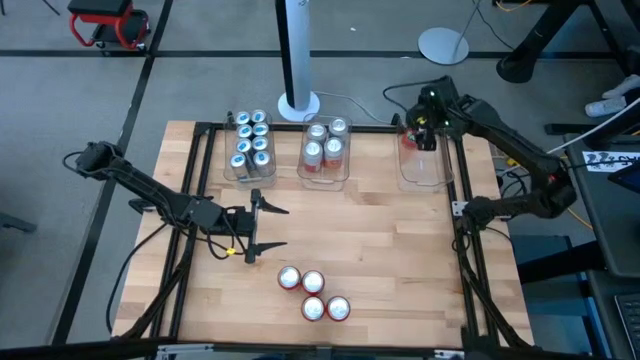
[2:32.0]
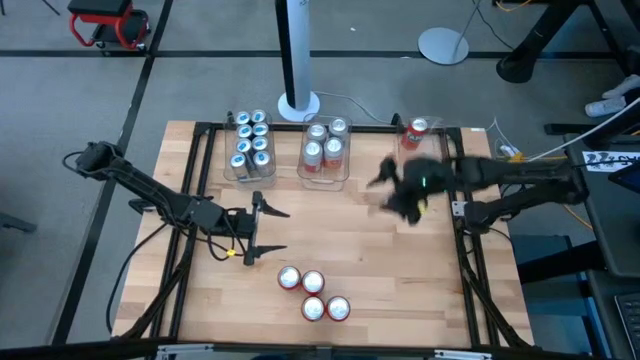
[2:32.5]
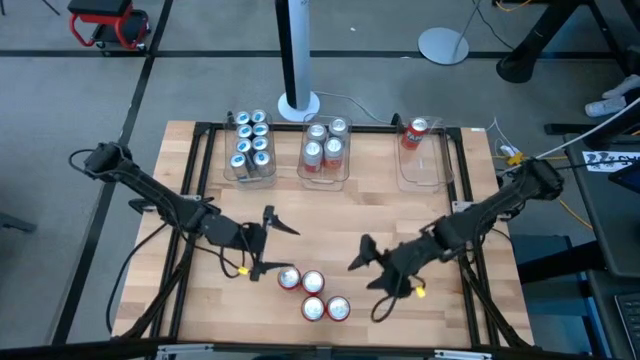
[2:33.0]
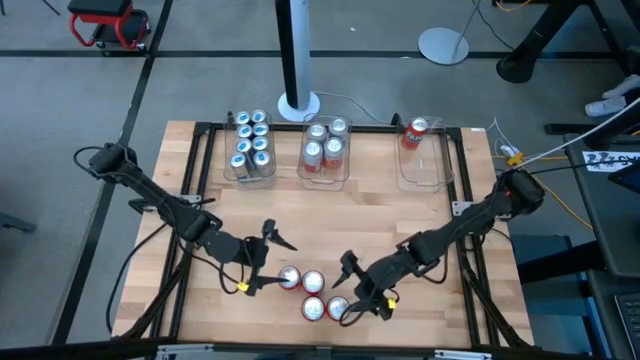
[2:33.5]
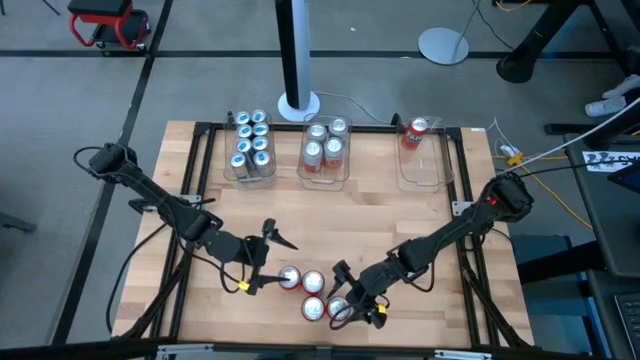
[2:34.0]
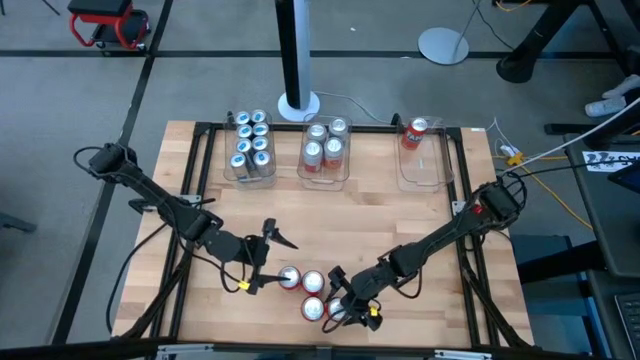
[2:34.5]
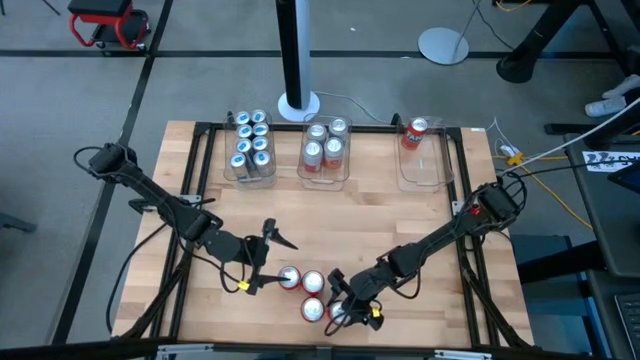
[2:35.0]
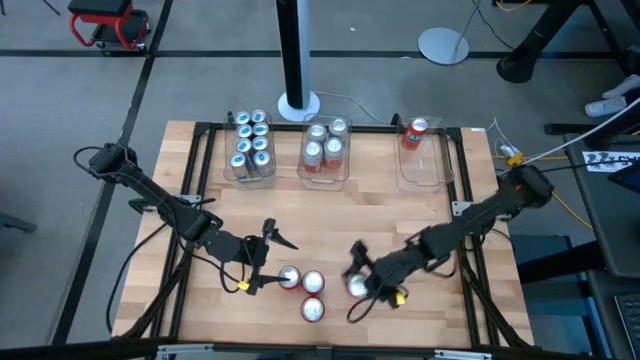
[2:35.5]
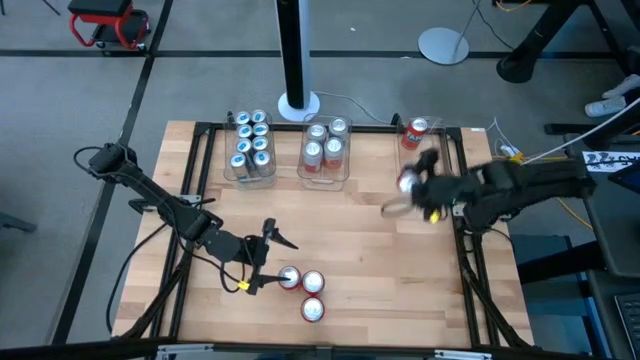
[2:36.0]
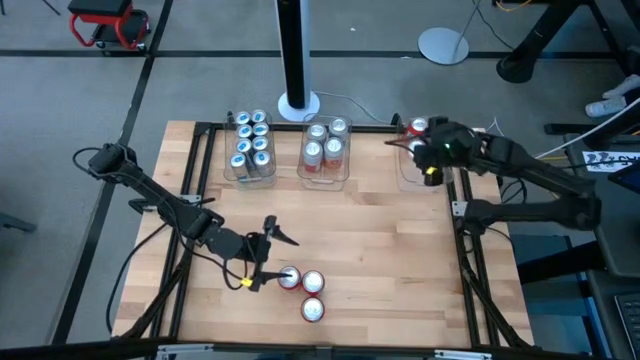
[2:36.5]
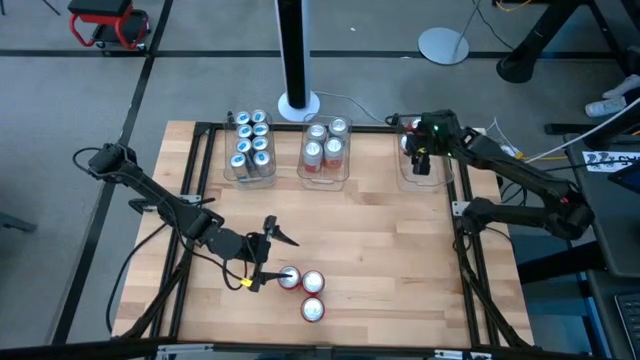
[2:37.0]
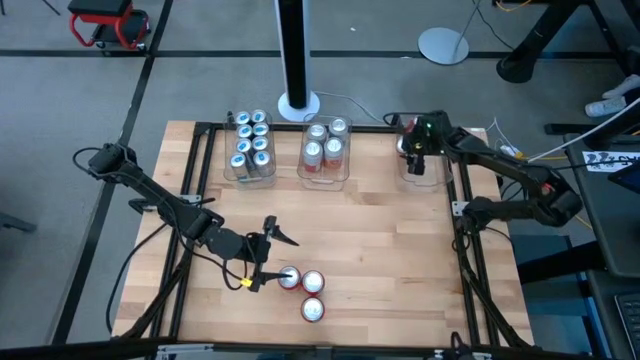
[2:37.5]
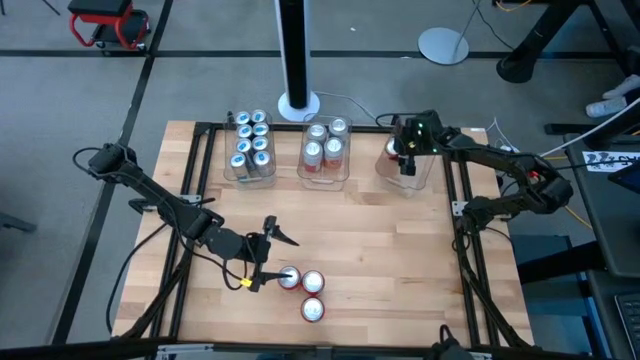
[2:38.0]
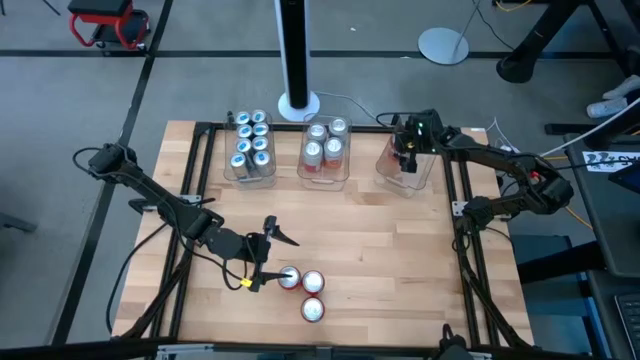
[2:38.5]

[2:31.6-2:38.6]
Task: Sort soda cans
Put the red soda can into the right transparent bin

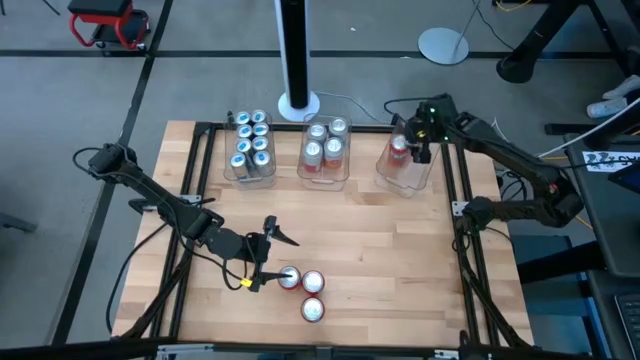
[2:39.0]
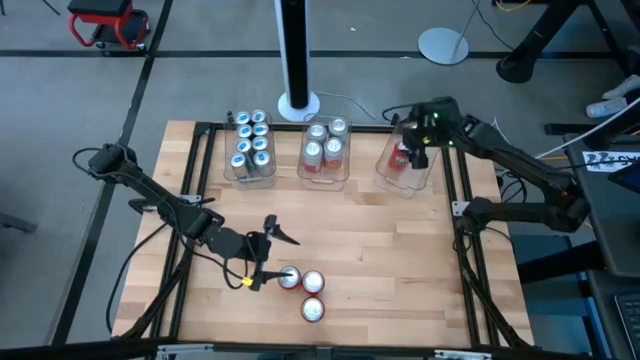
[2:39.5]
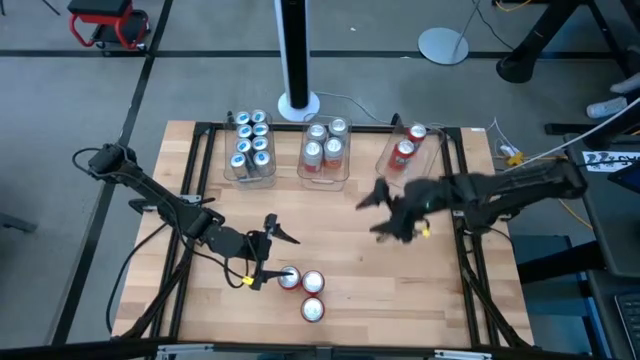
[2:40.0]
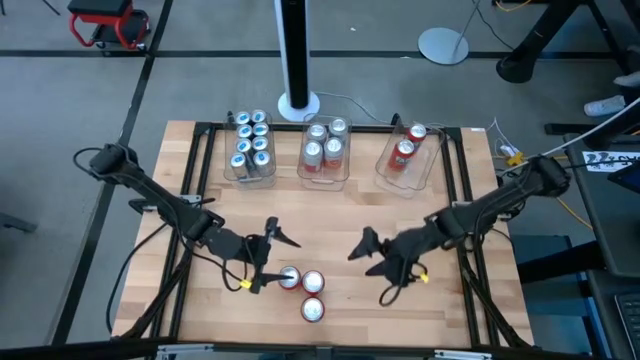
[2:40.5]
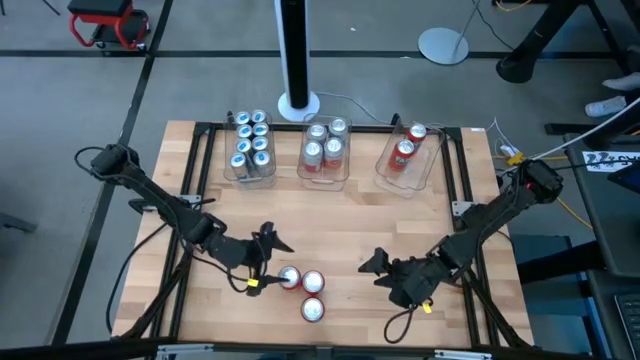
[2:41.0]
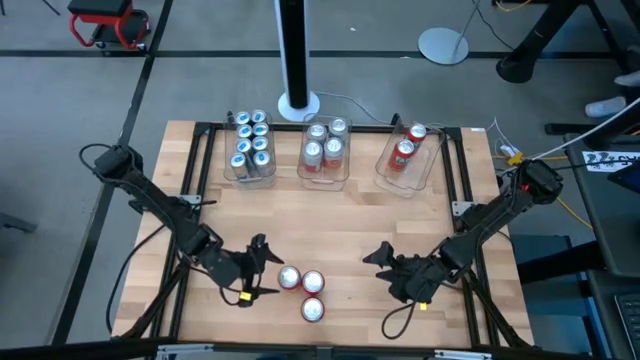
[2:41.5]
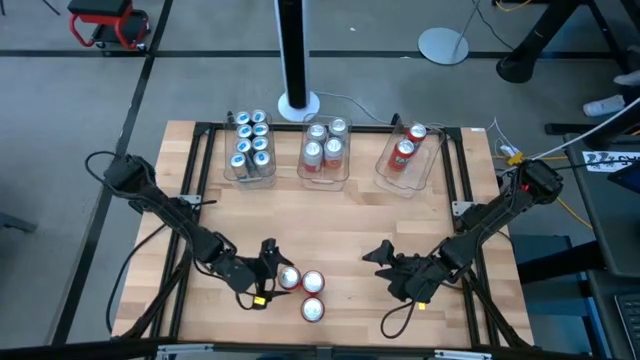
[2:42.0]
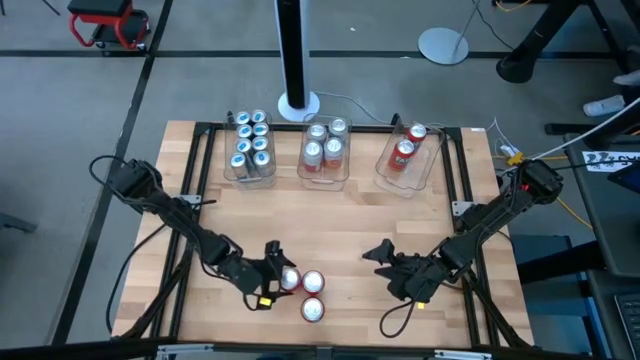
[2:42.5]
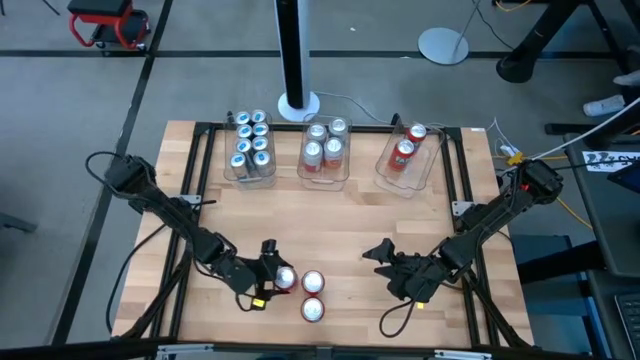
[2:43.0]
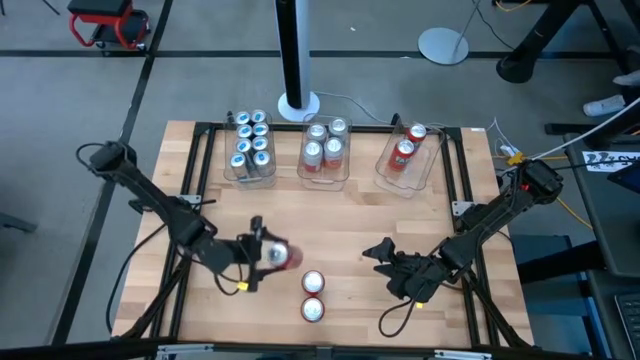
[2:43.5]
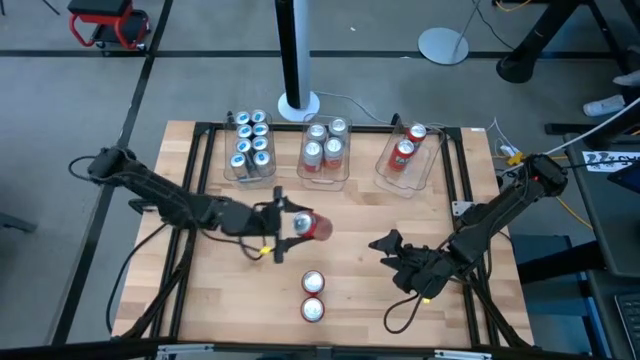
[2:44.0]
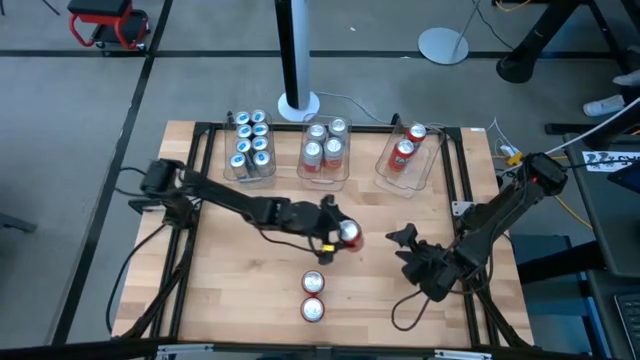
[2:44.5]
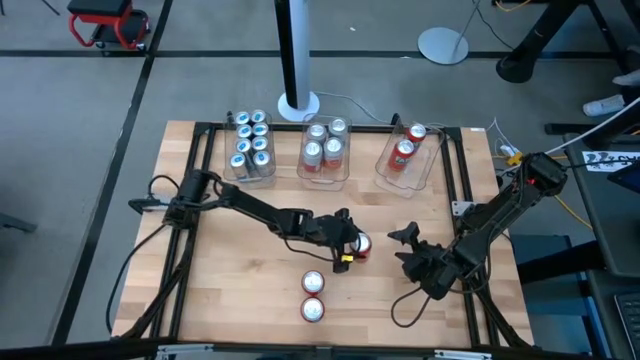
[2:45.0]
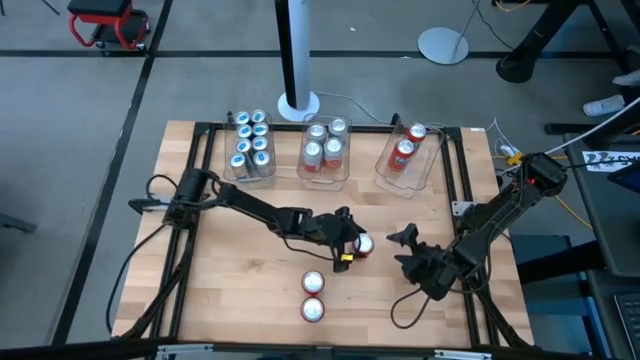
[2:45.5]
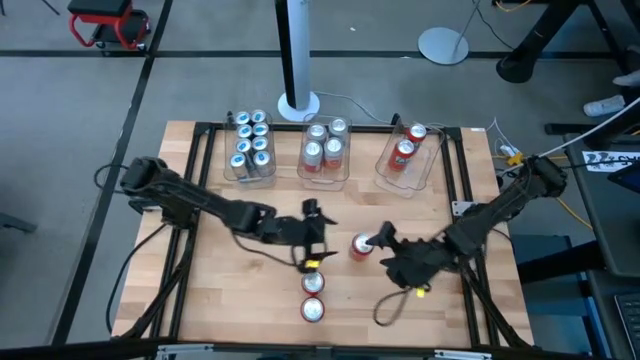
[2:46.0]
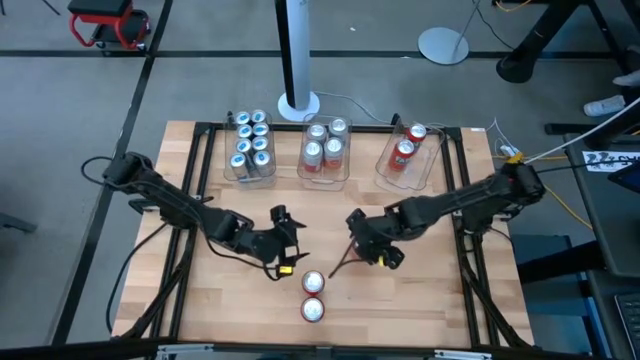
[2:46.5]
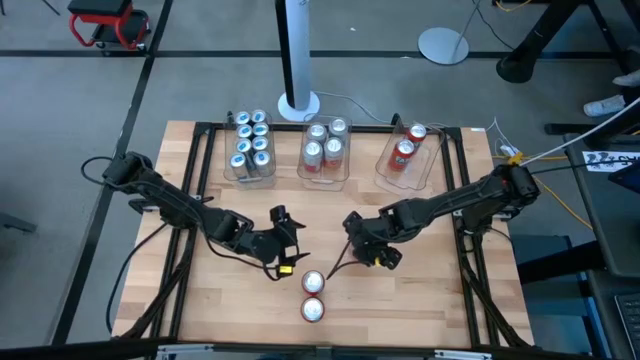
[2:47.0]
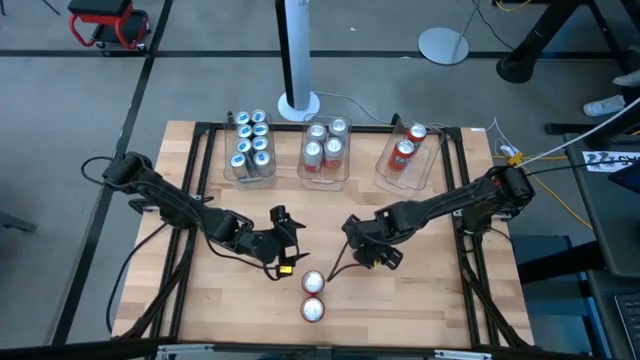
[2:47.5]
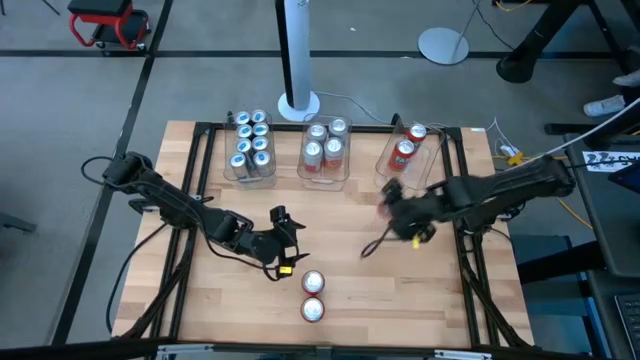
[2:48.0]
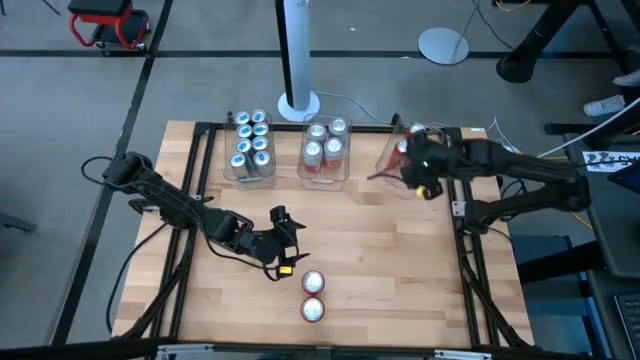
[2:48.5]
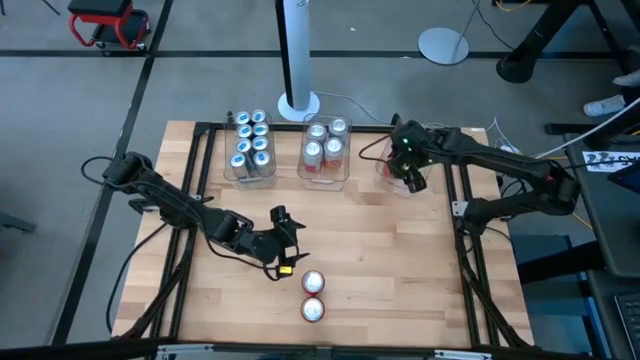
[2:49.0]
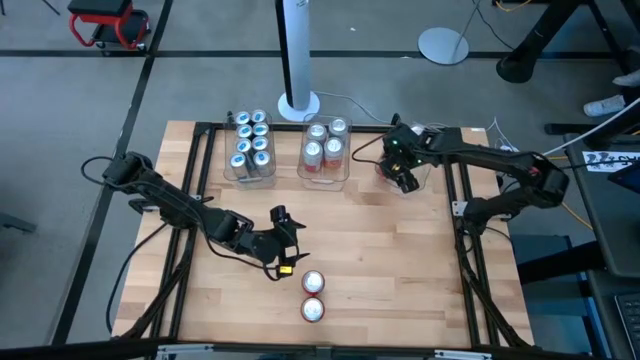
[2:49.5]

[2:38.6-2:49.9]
Put the red soda can into the right transparent bin

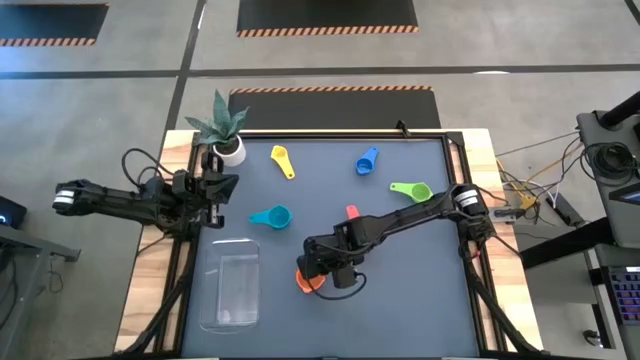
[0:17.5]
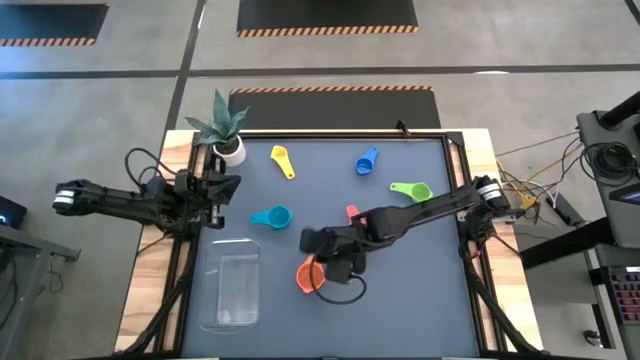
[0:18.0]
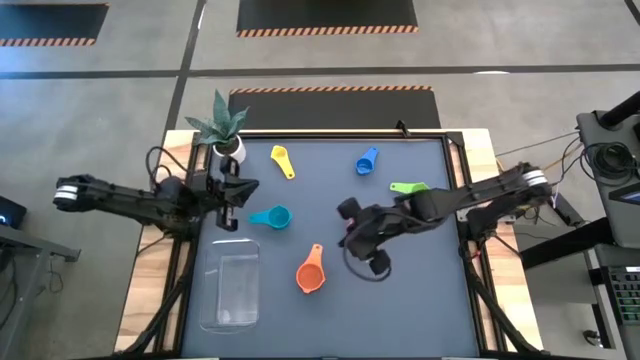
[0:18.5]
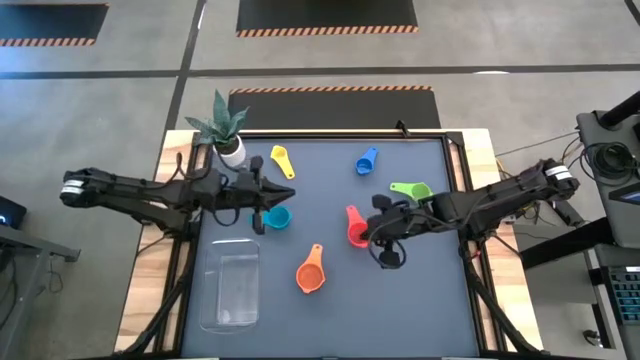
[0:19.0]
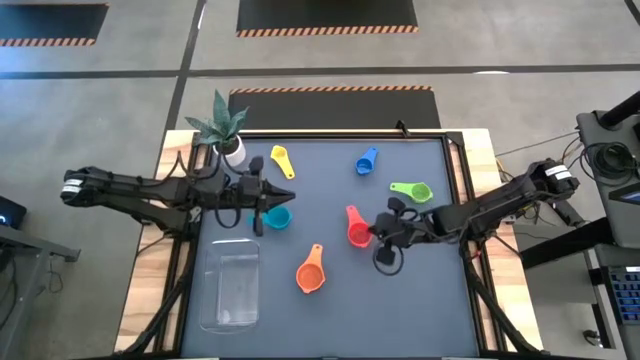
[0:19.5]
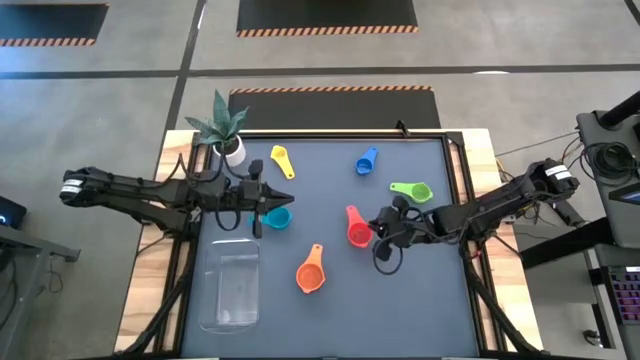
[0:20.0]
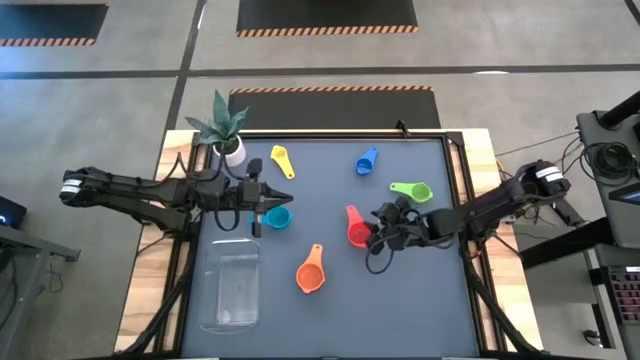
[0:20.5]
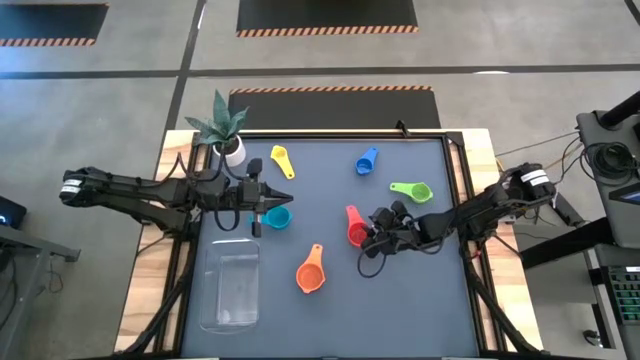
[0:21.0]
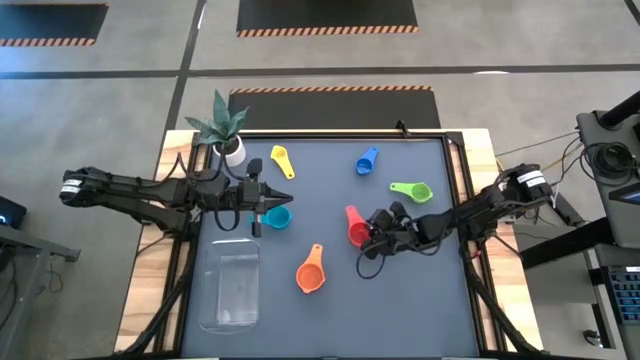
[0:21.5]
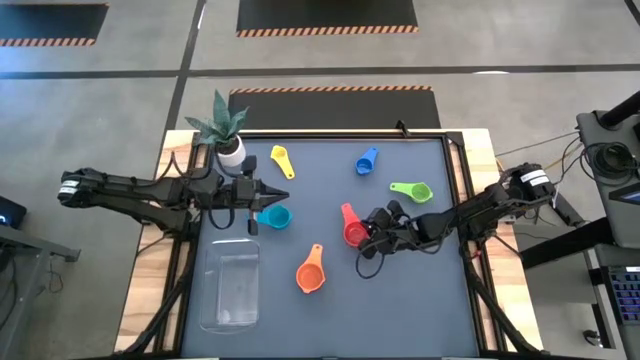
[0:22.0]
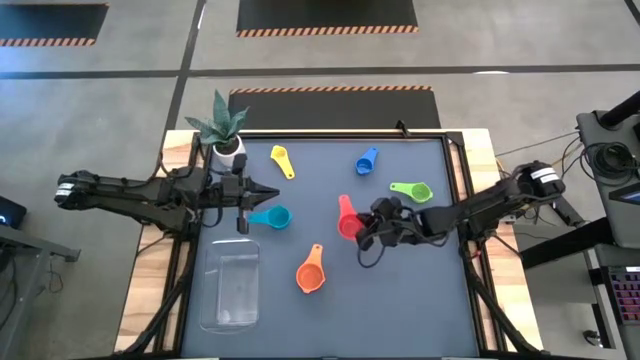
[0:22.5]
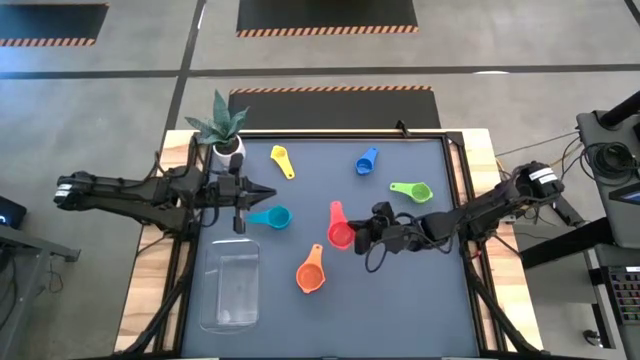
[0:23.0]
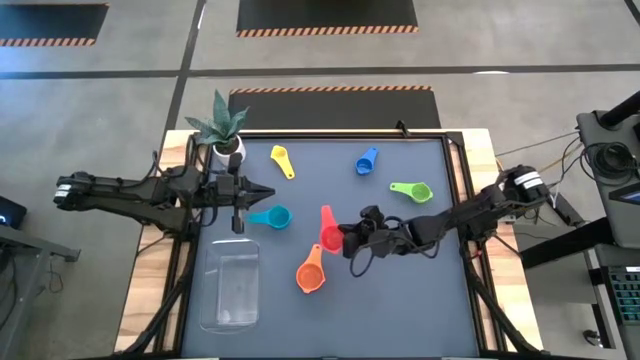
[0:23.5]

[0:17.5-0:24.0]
Task: Nest measuring cups in basket
Stack the red measuring cup on top of the orange cup
